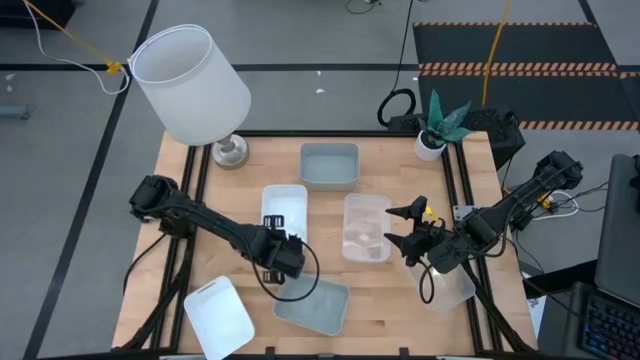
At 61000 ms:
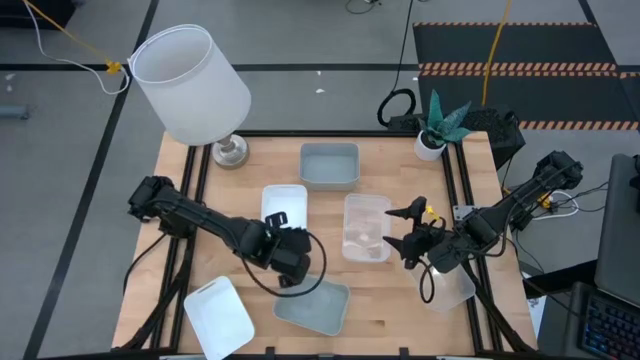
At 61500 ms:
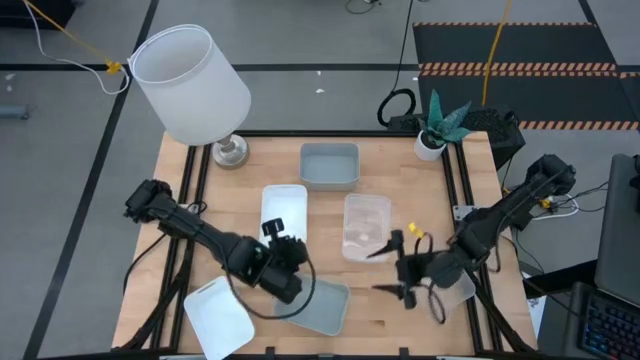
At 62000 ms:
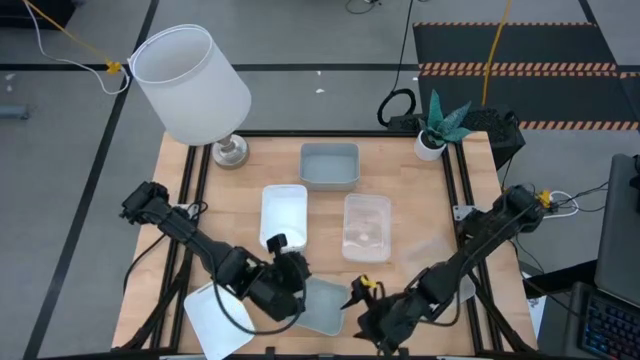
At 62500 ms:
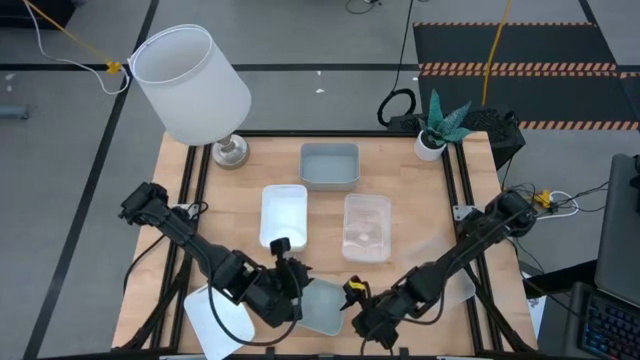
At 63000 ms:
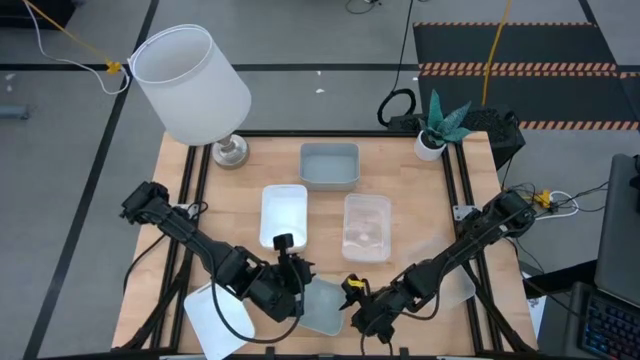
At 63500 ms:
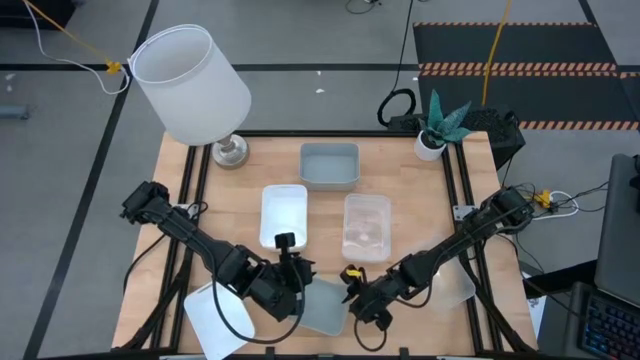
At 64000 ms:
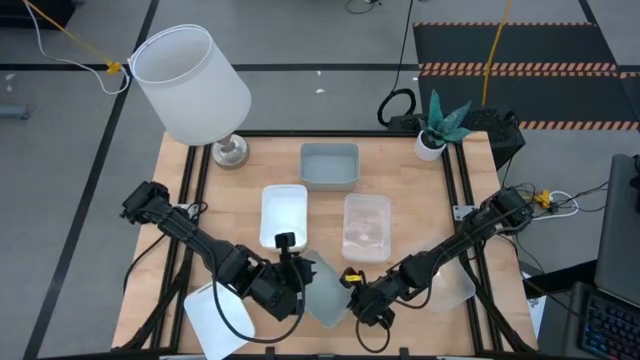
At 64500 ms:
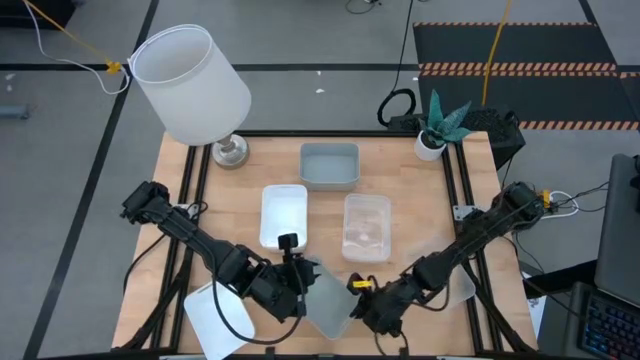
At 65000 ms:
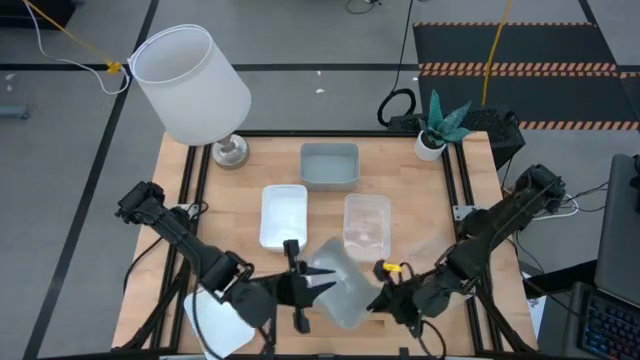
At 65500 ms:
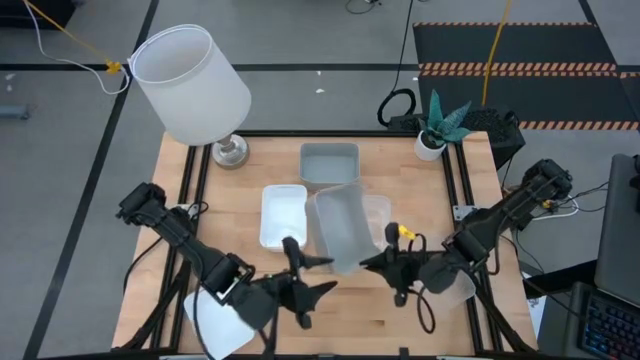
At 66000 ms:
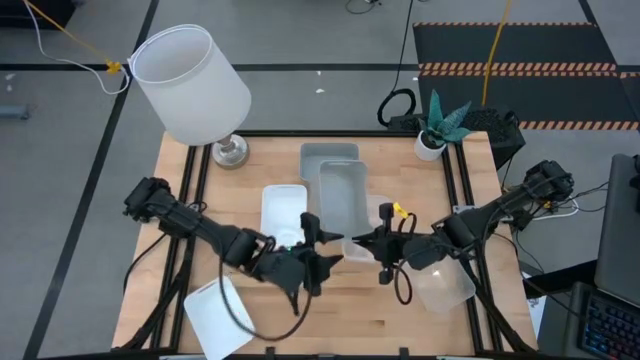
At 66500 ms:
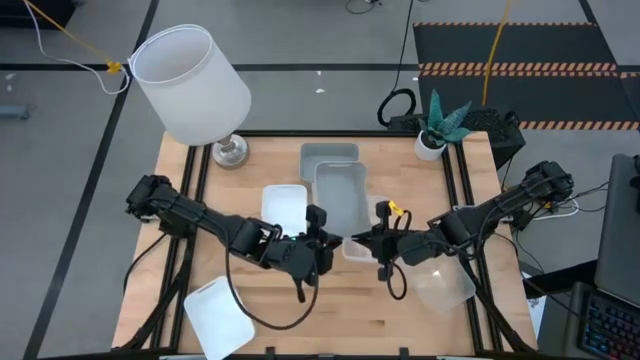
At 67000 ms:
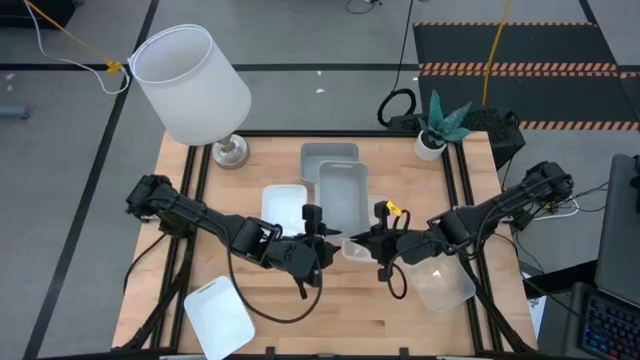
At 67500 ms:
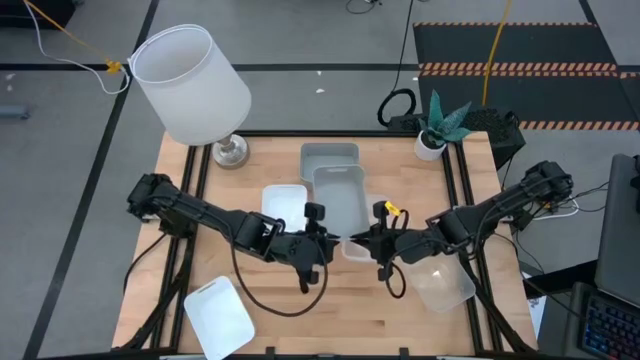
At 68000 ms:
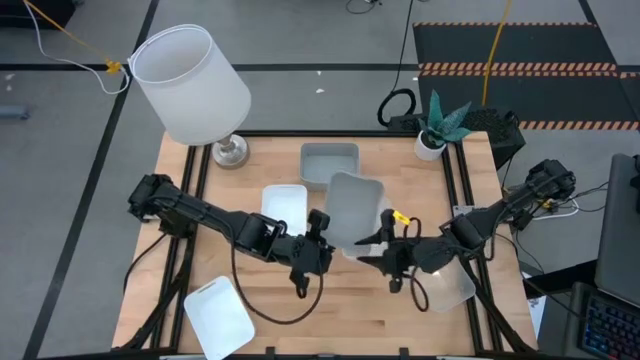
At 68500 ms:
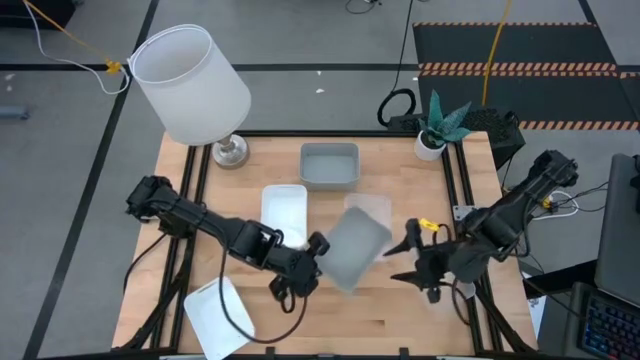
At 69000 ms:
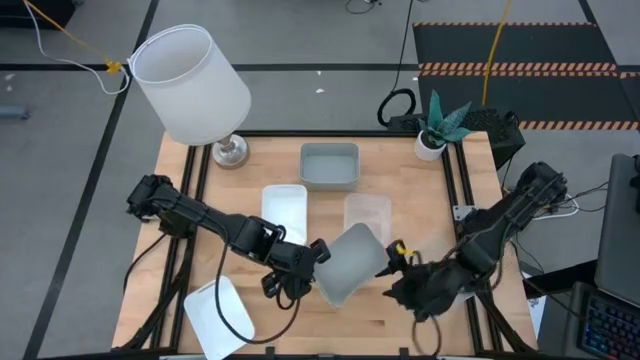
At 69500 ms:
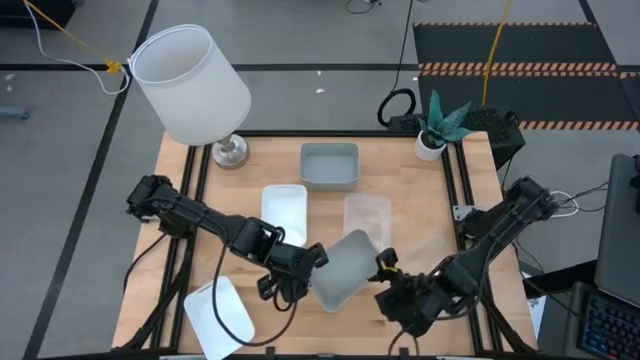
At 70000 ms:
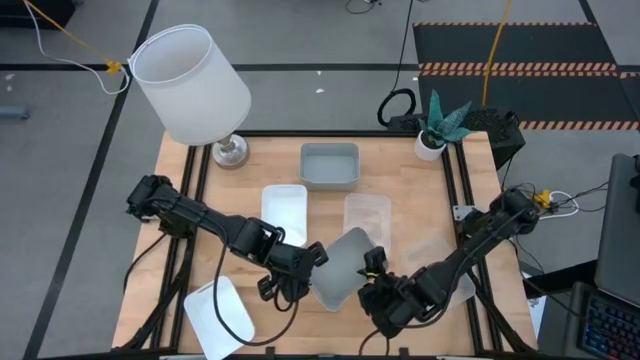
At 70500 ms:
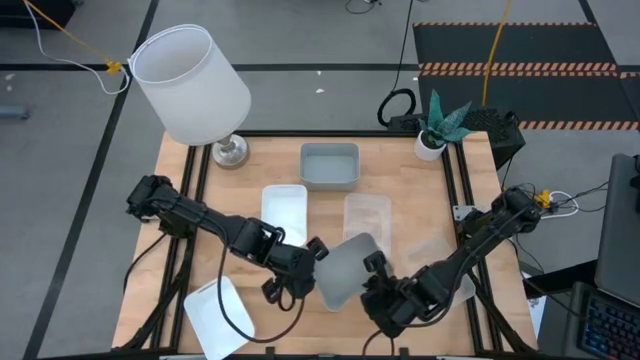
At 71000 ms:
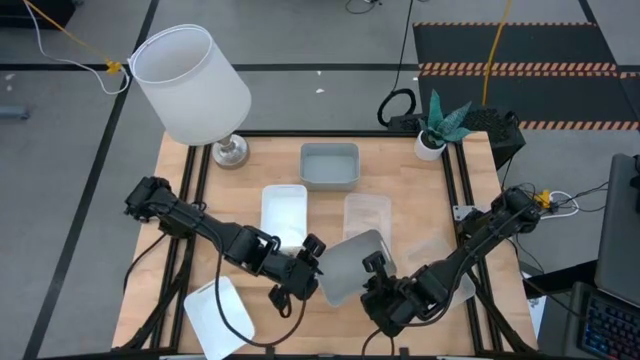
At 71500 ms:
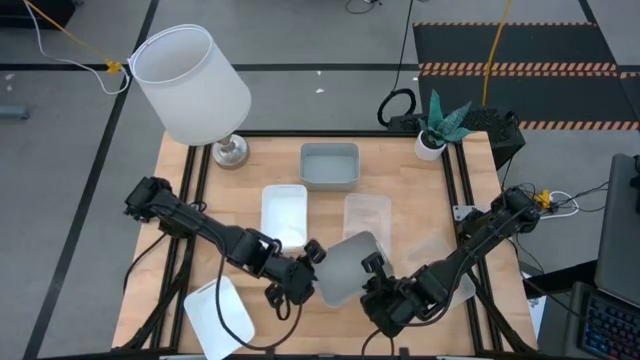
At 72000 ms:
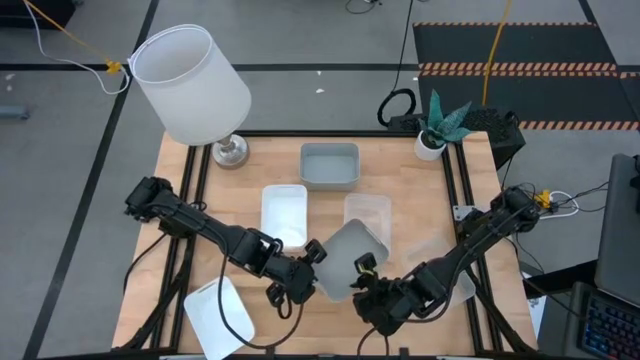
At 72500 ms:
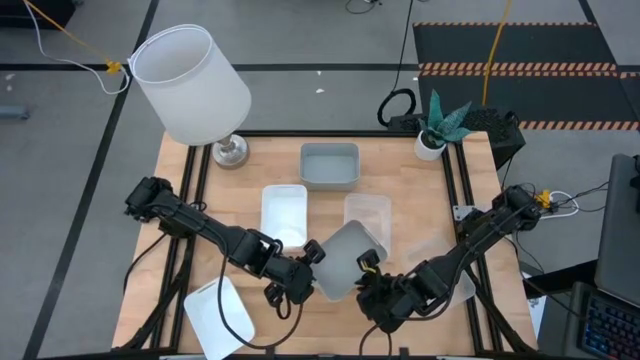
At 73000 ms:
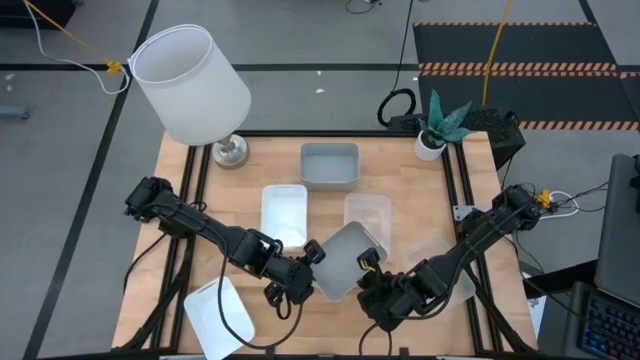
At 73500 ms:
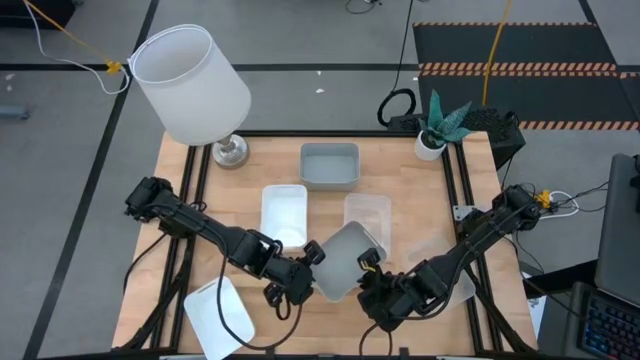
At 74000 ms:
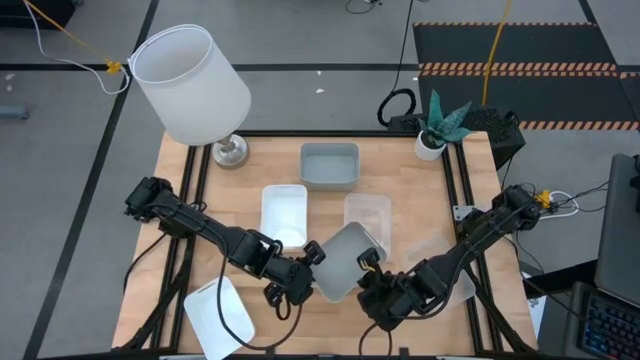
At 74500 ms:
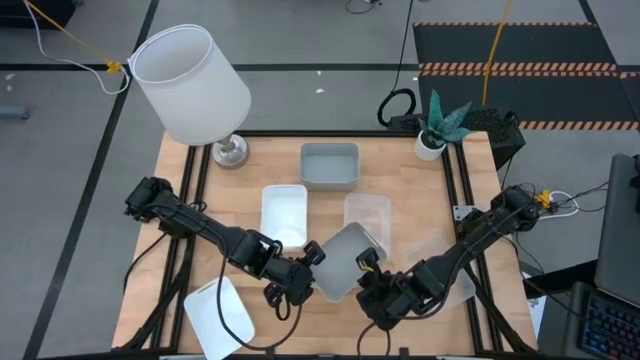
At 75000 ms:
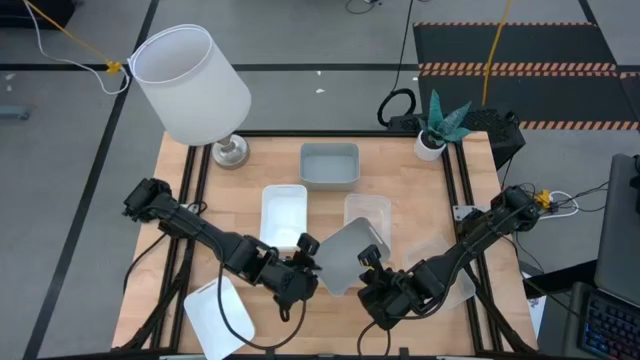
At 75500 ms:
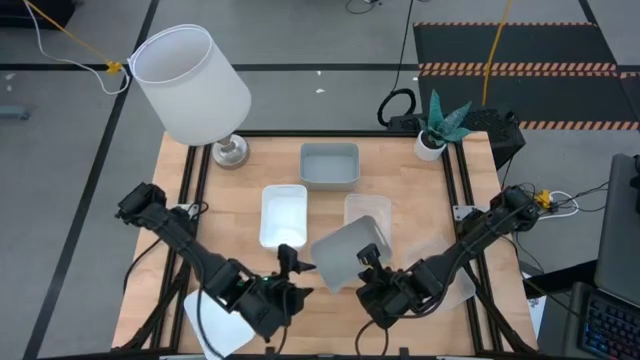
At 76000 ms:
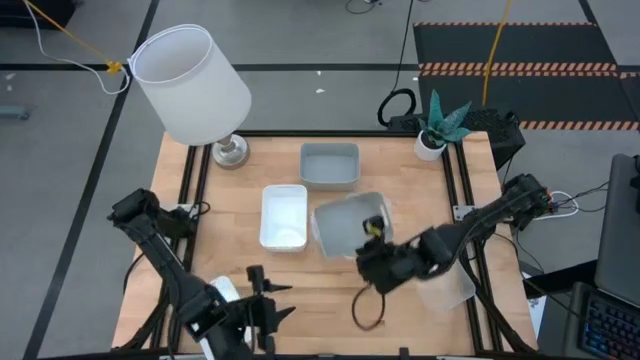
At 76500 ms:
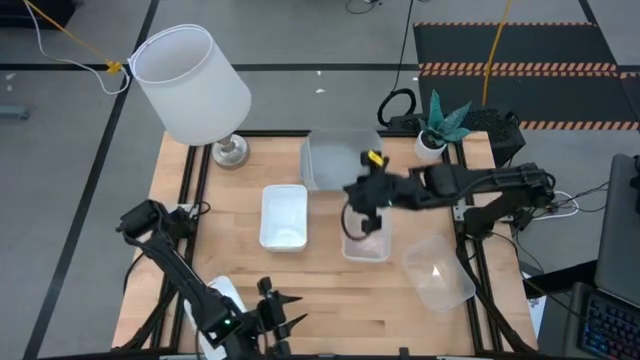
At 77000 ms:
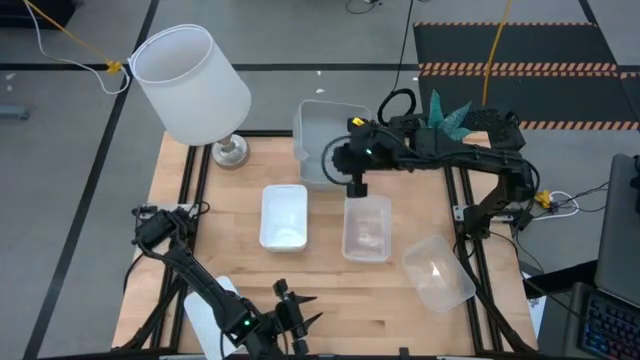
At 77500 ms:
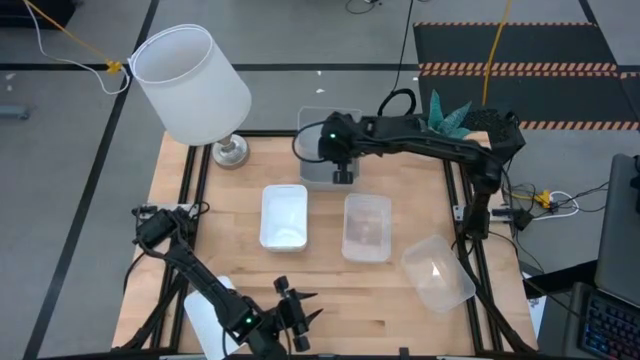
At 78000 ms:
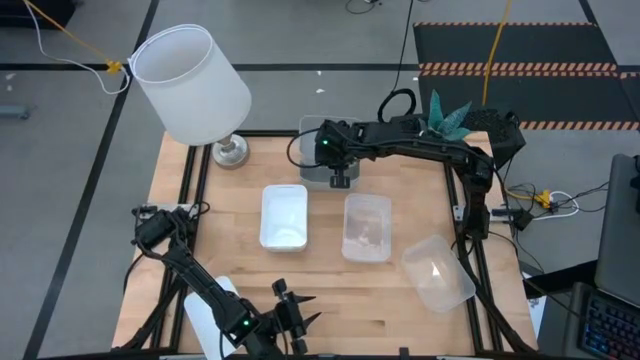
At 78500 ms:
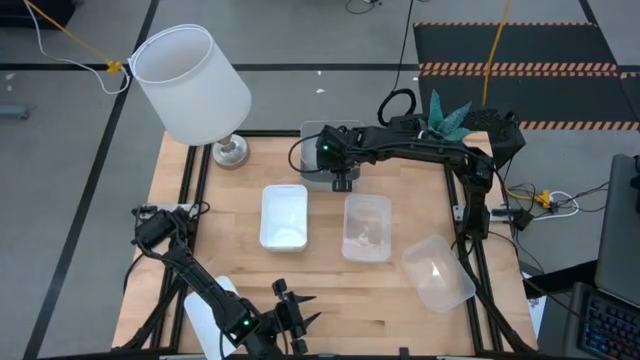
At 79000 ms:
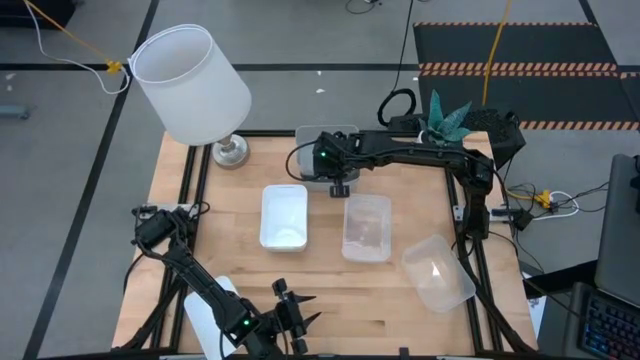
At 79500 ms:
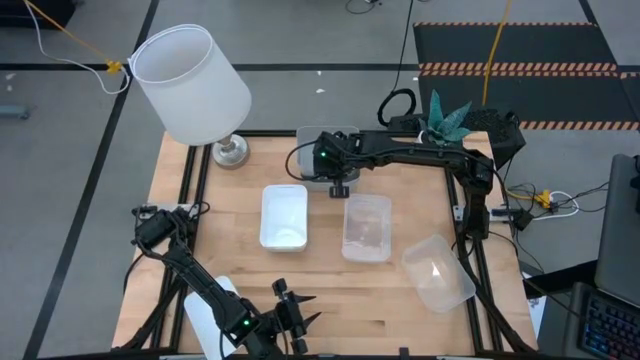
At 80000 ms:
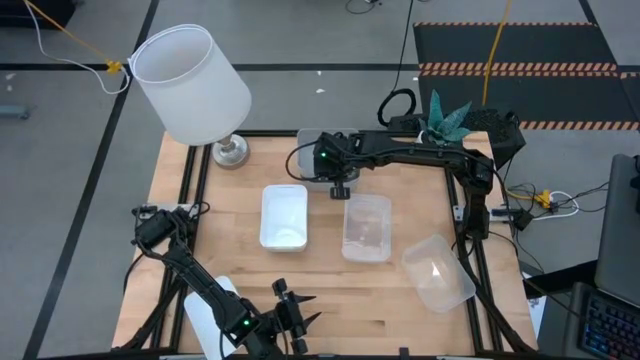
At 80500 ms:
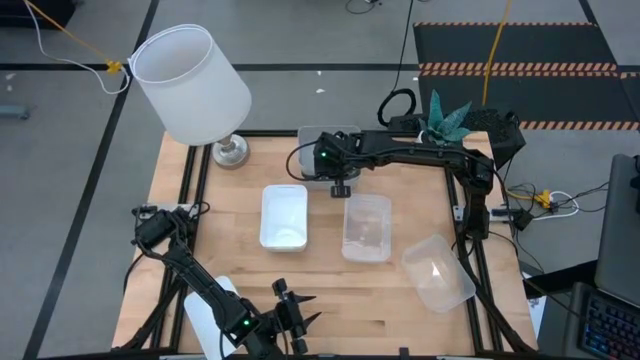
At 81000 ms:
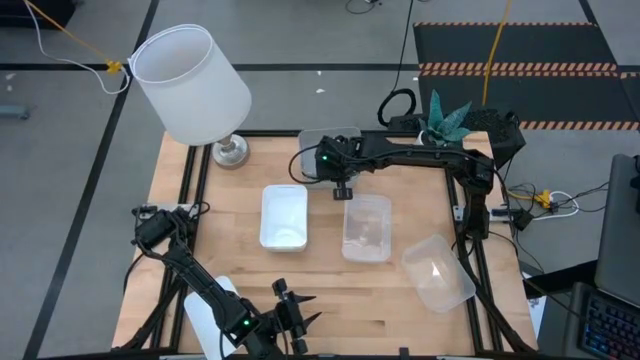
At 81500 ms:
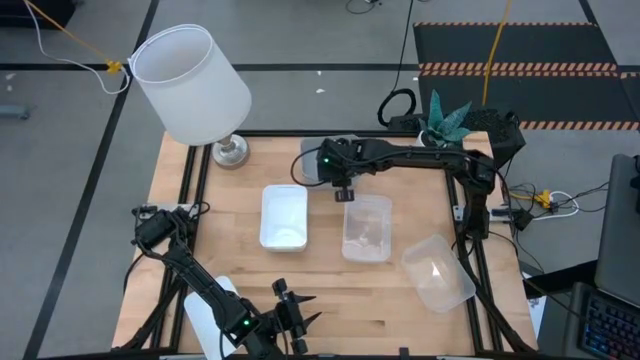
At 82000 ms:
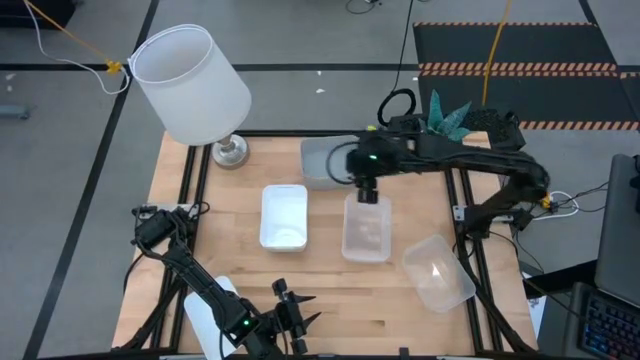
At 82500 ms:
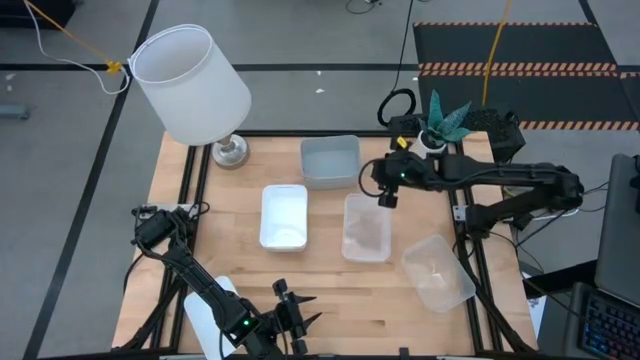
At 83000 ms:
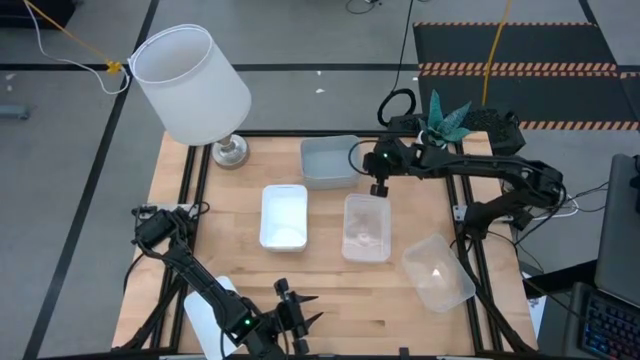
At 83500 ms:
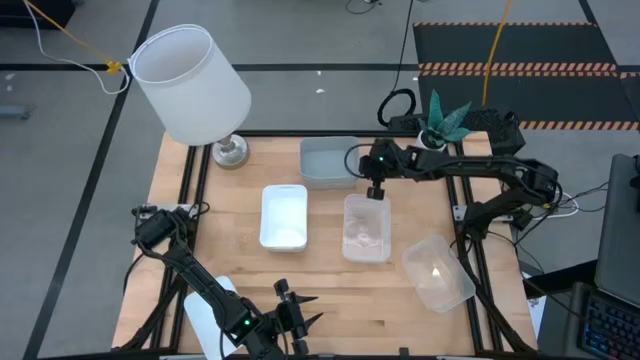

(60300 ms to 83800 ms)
Stack the bottom gray bin on top of the top gray bin
